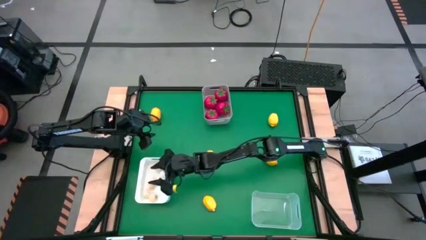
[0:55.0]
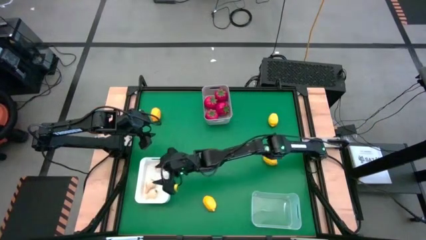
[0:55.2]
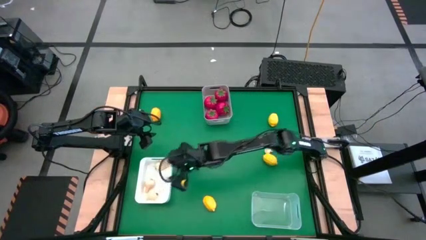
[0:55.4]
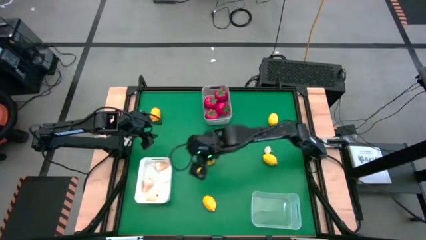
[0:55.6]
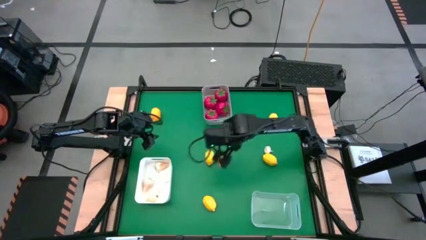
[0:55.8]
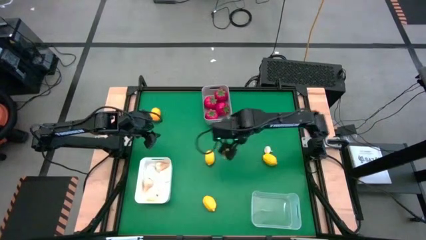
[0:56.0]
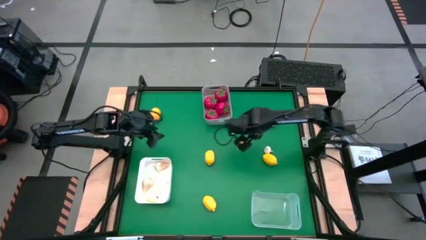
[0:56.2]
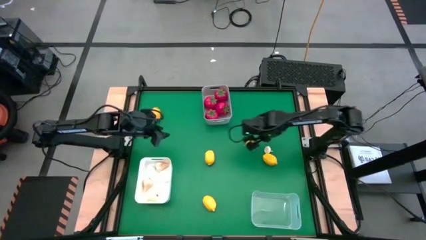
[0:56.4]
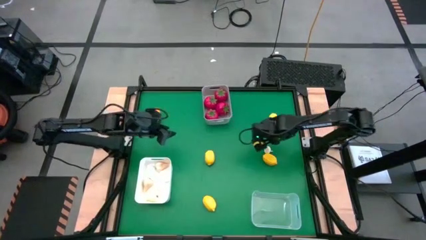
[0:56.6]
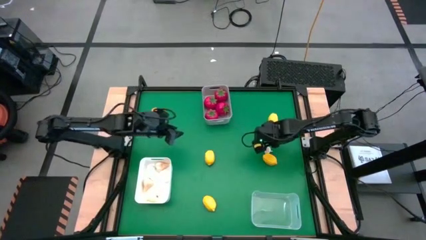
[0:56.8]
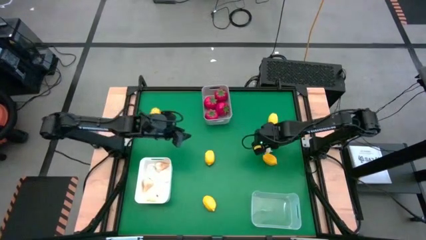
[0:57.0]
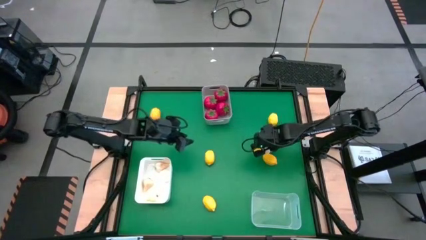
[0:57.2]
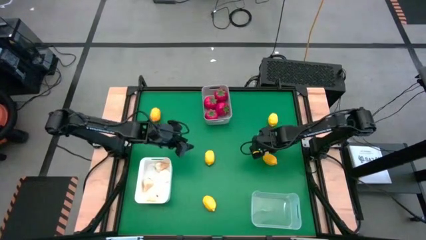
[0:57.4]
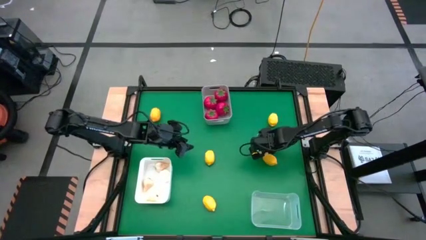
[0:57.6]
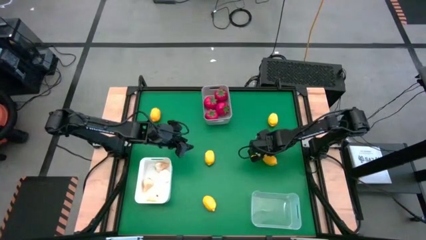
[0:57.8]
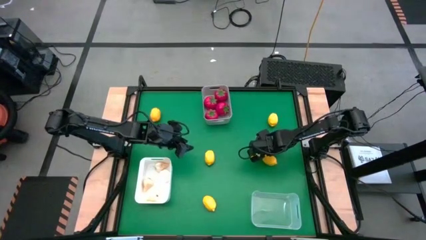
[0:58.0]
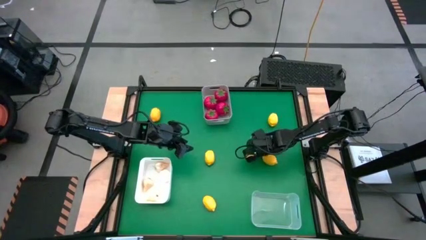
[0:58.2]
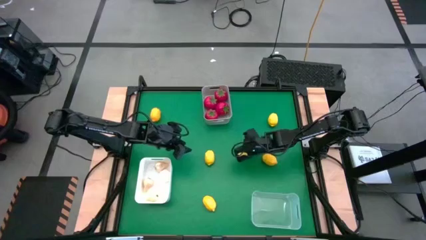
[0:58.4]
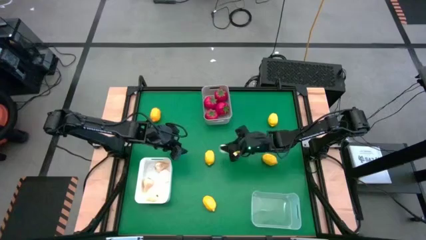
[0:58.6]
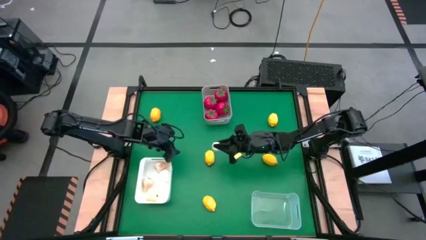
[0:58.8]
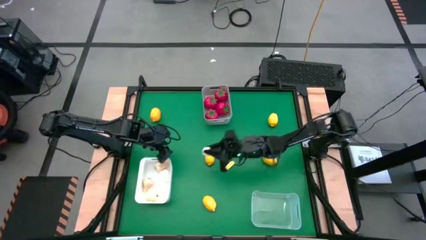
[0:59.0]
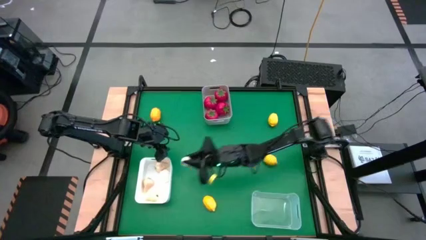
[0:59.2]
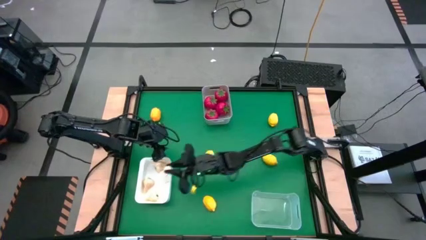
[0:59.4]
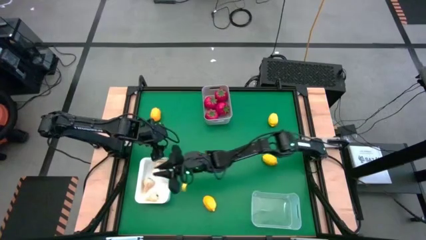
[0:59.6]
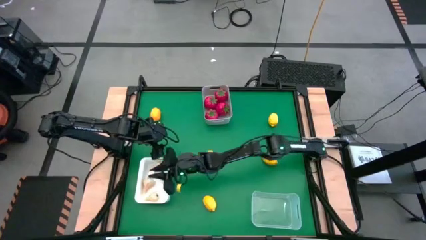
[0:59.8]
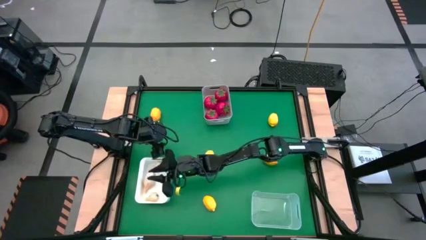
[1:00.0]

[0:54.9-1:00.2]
Task: Sort produce into baskets
Put the garlic into the white bin

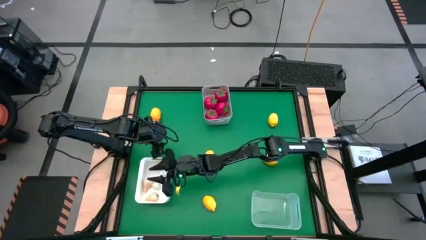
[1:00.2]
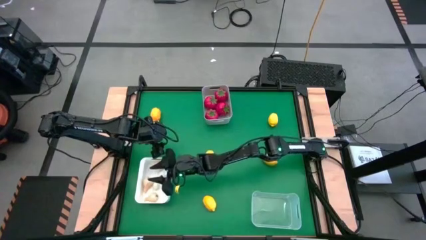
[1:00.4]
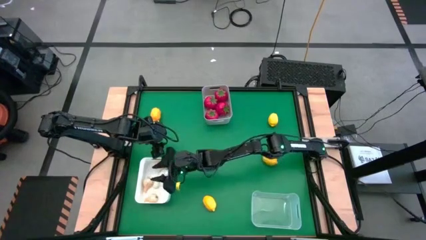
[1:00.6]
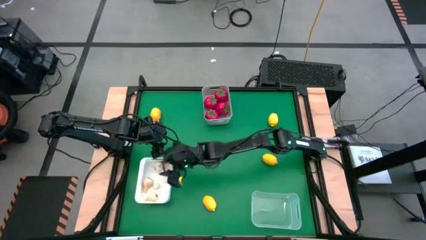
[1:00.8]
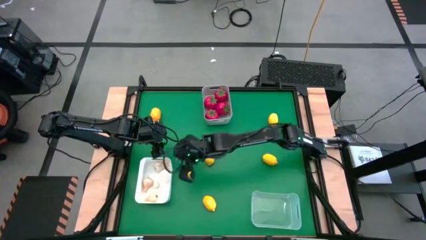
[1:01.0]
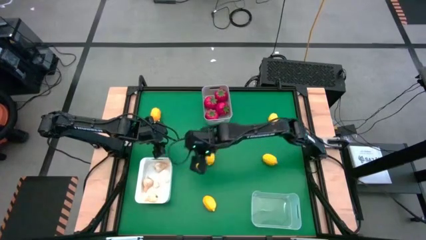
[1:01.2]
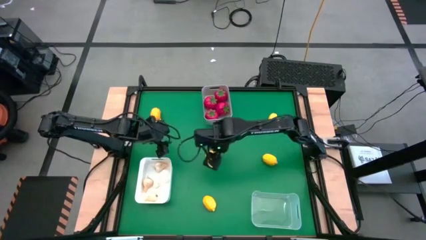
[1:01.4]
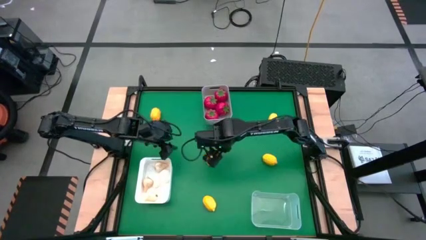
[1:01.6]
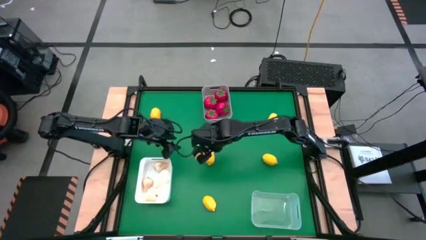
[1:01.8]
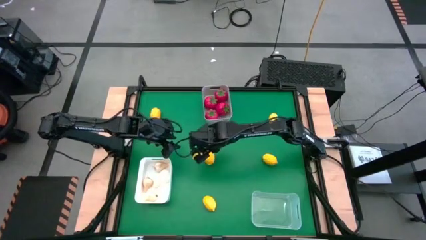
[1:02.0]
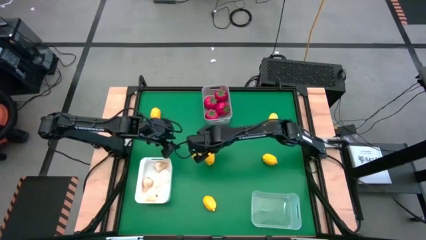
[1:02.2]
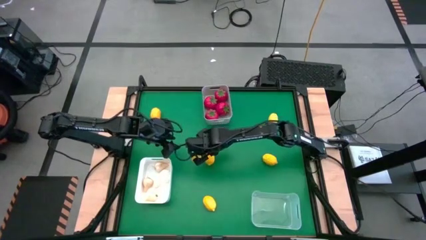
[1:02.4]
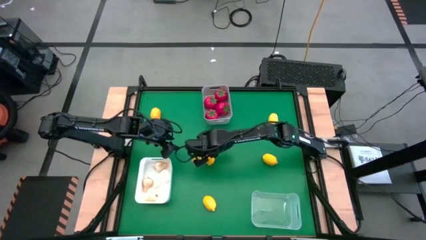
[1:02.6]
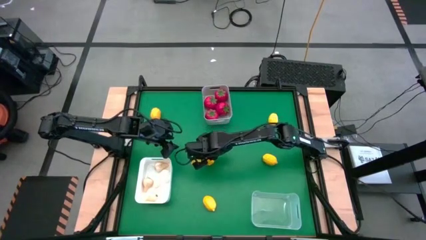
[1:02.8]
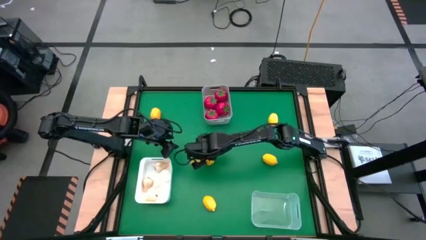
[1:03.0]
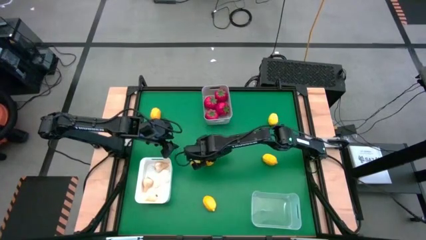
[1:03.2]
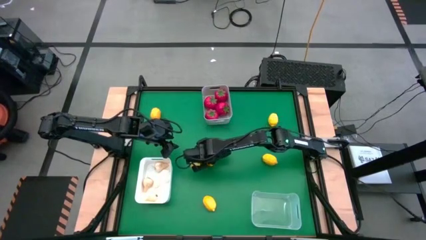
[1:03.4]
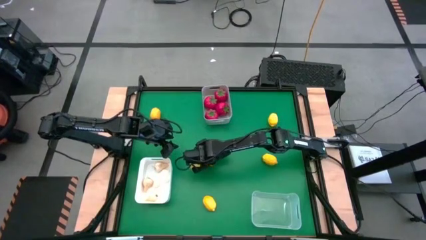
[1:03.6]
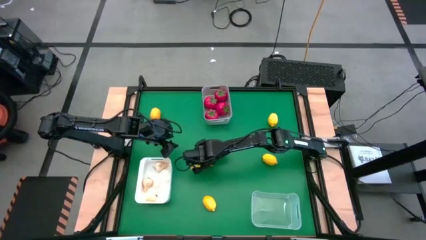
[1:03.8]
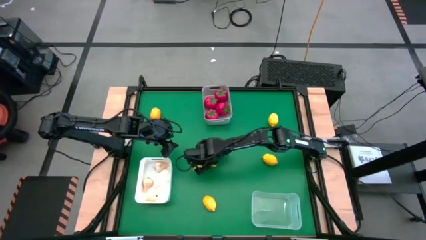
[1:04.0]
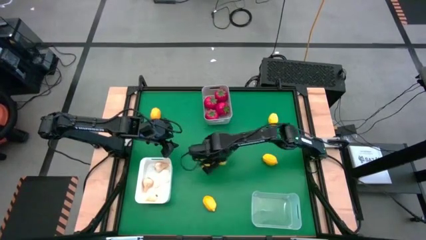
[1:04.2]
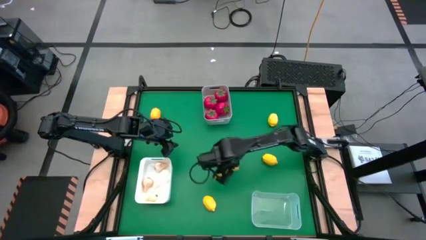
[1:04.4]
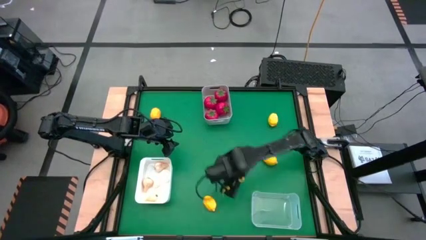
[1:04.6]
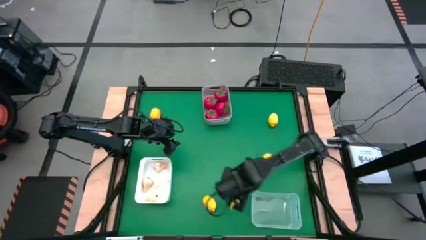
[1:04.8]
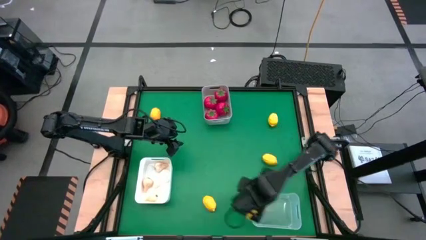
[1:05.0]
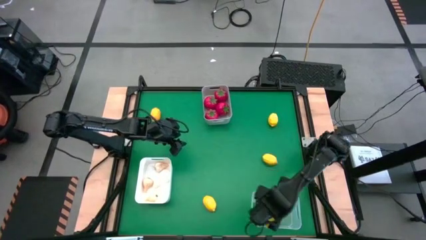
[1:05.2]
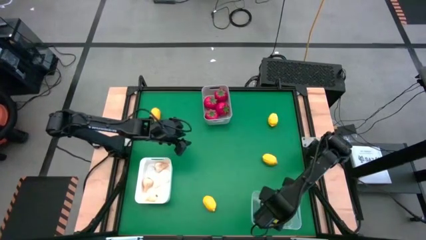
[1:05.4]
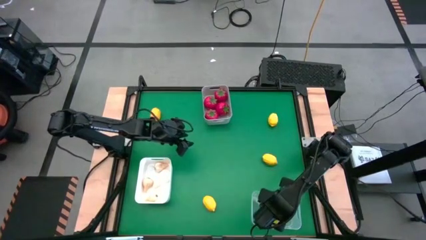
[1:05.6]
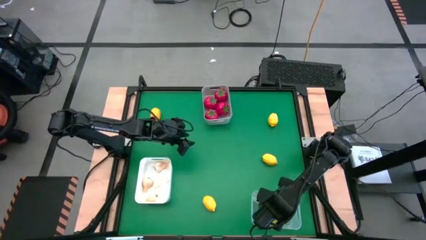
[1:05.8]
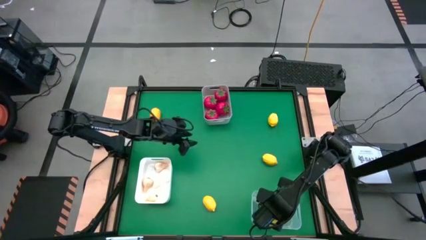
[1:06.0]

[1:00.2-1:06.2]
Put the lemon into the transparent bin

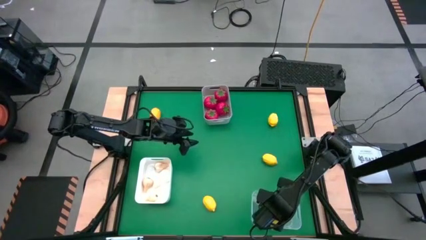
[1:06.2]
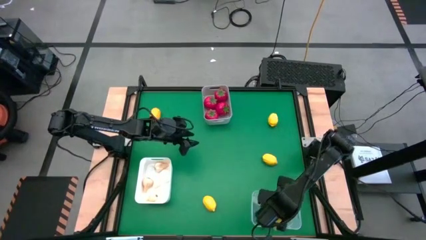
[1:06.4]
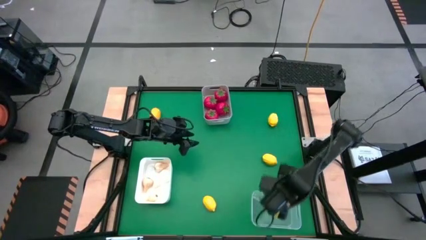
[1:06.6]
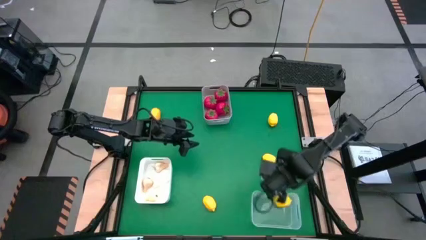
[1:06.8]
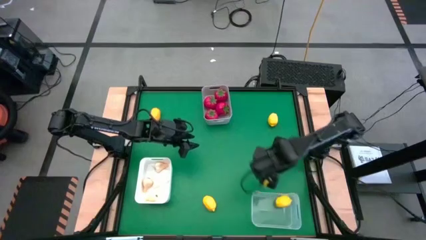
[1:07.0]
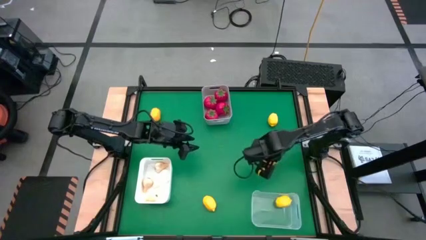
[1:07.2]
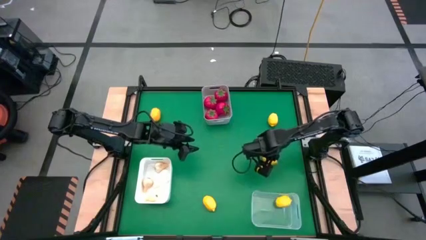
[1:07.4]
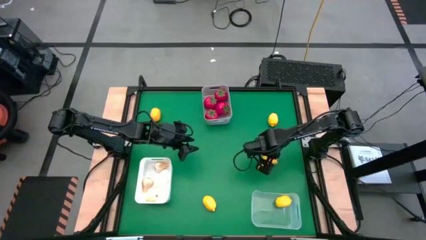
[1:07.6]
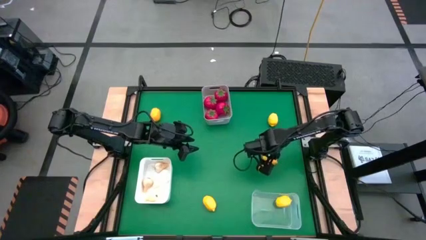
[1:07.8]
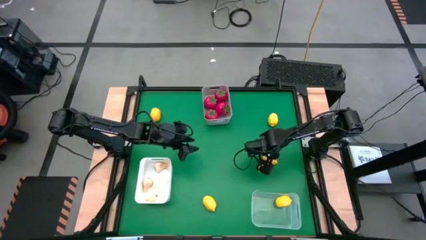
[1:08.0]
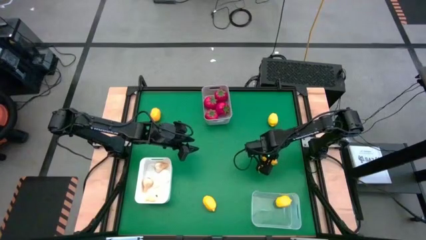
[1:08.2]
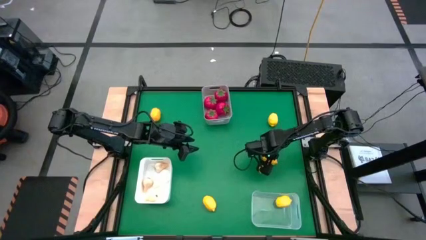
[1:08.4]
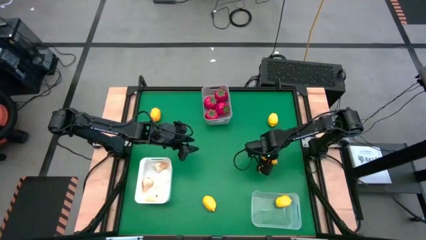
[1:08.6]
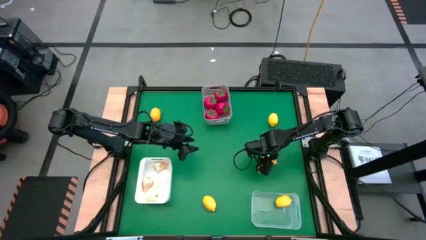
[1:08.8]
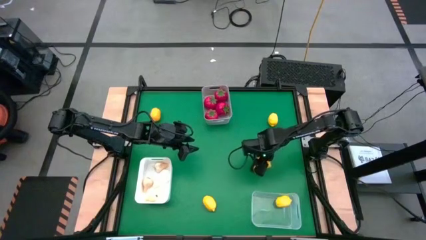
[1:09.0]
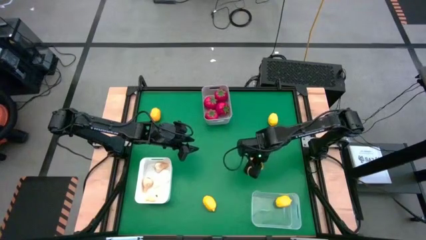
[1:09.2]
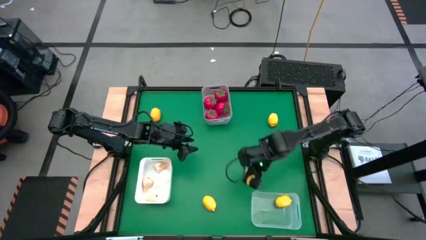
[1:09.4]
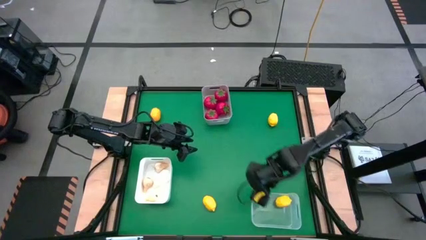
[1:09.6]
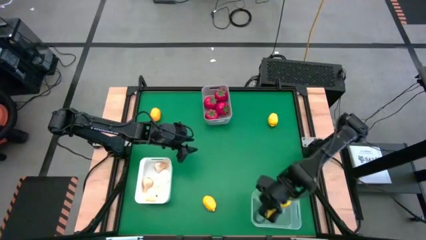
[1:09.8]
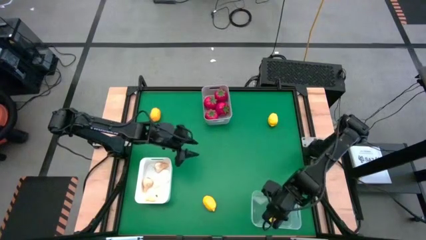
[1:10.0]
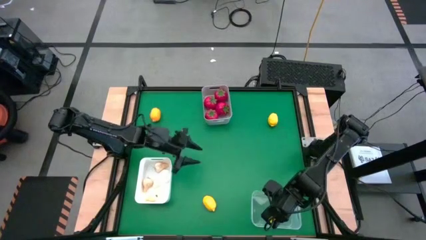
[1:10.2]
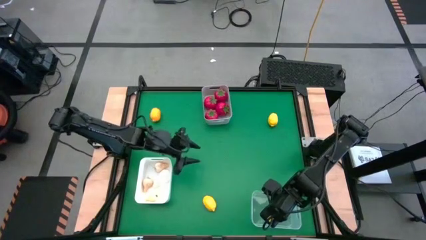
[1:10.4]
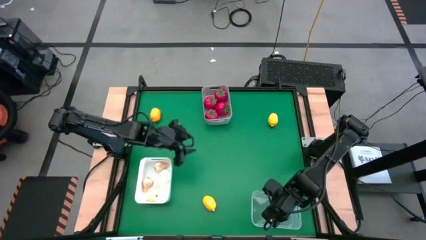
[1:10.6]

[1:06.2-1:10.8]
Put the lemon into the transparent bin

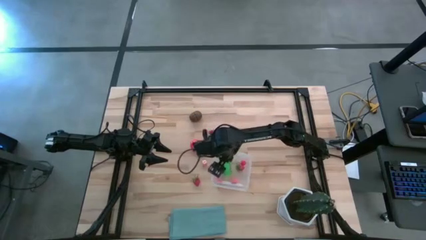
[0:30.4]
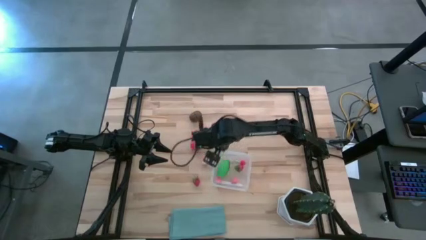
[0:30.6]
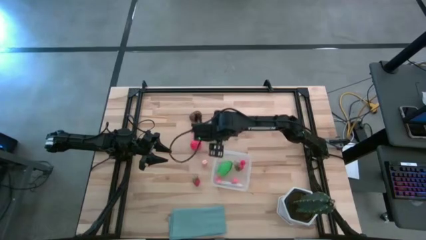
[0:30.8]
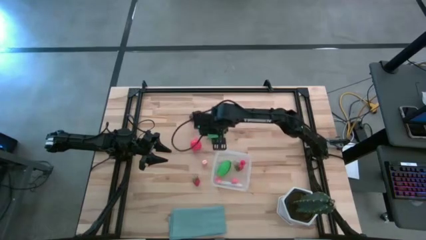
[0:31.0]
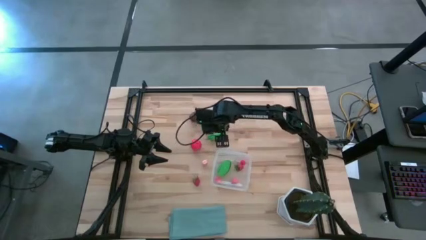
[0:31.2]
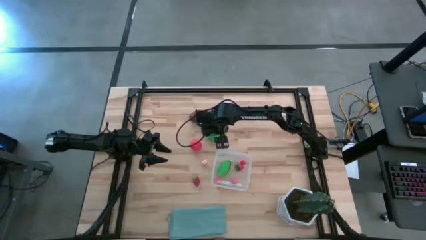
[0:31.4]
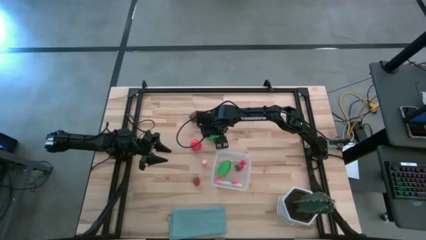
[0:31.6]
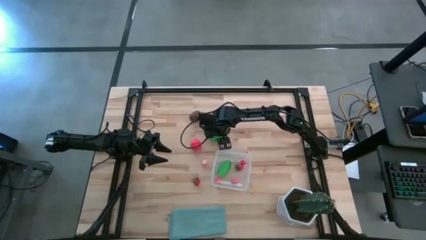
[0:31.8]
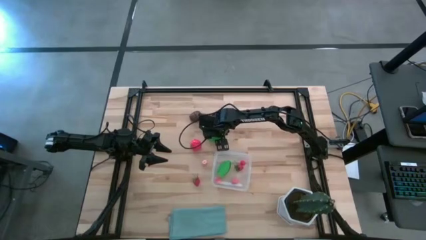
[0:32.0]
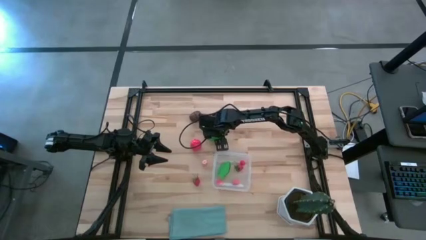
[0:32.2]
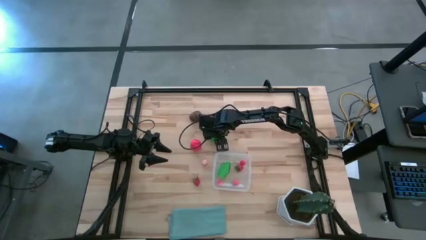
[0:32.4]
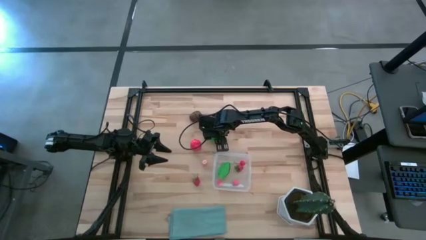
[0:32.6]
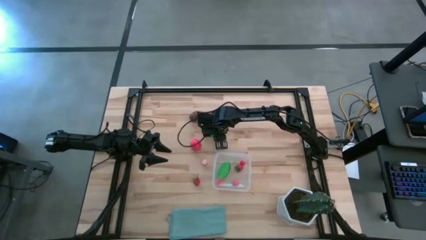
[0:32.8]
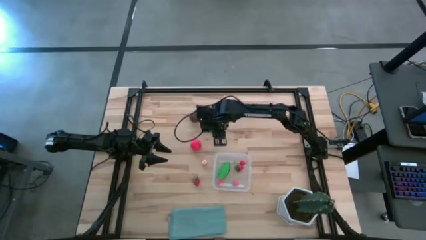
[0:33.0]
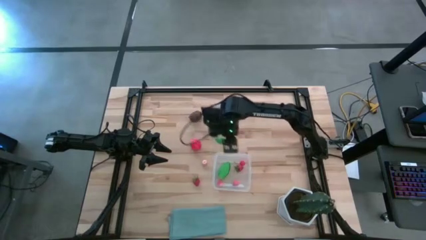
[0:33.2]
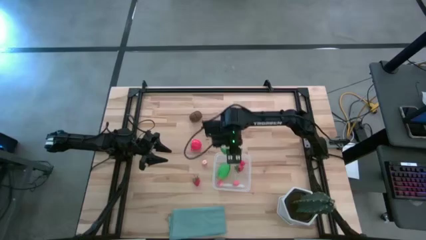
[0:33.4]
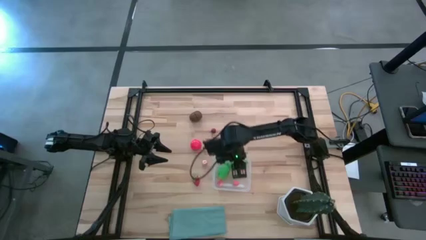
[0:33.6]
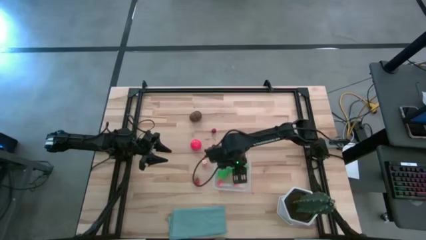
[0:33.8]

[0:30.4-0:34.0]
Task: Pick and placing Produce into tupperware
Put the pea into the transparent container
